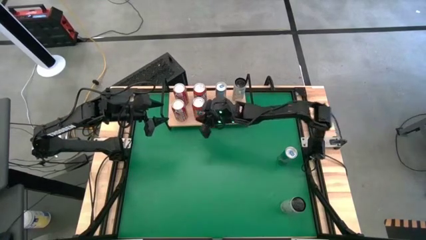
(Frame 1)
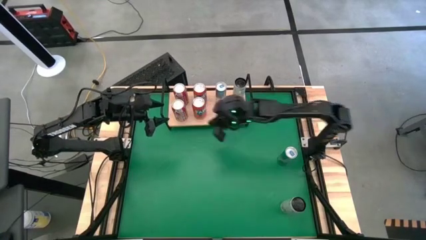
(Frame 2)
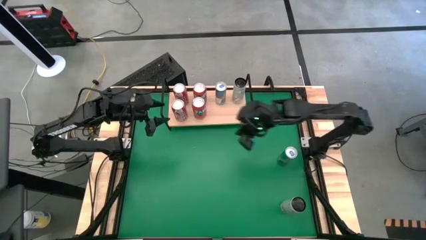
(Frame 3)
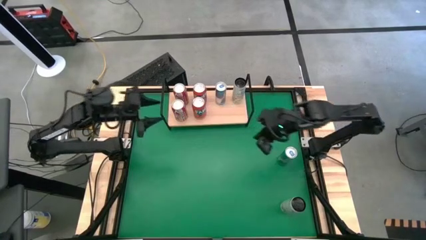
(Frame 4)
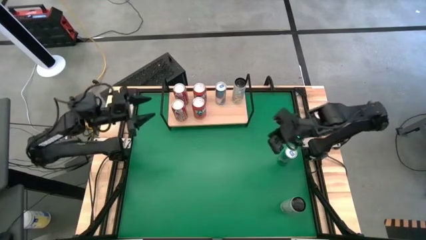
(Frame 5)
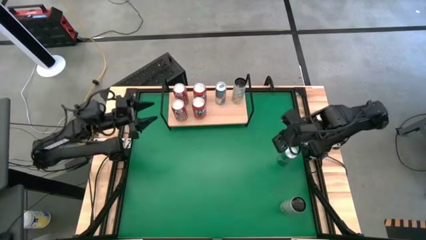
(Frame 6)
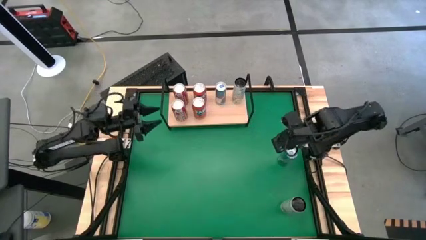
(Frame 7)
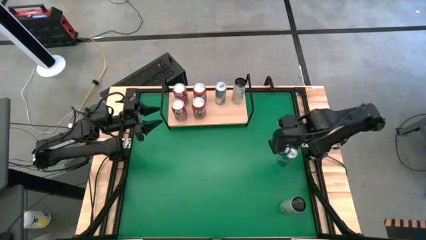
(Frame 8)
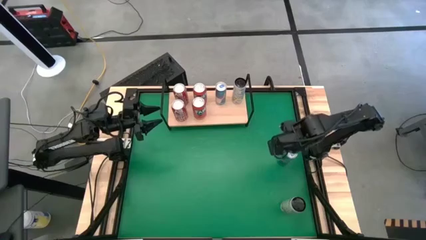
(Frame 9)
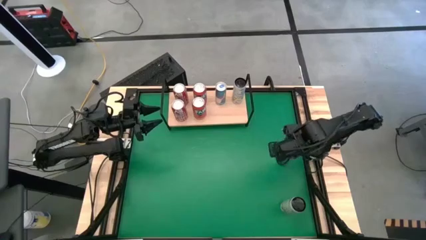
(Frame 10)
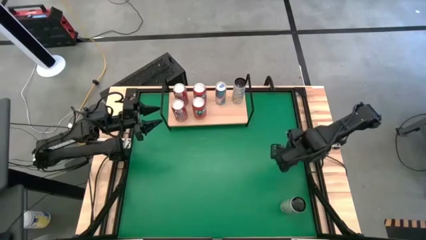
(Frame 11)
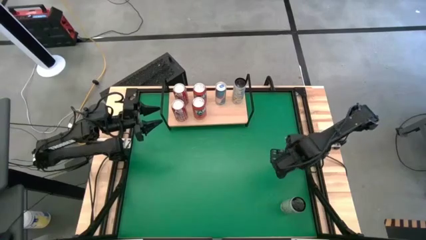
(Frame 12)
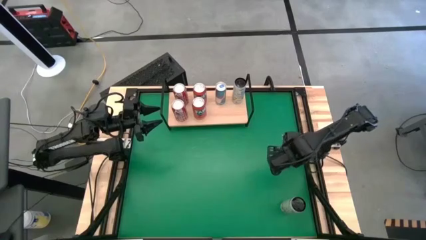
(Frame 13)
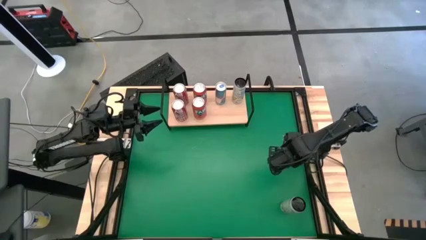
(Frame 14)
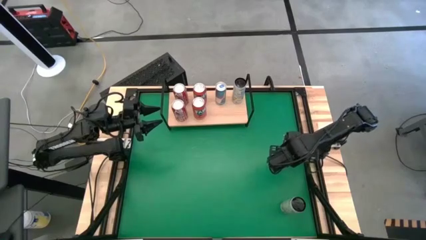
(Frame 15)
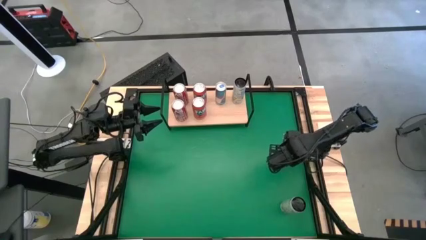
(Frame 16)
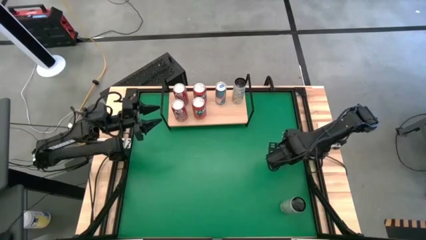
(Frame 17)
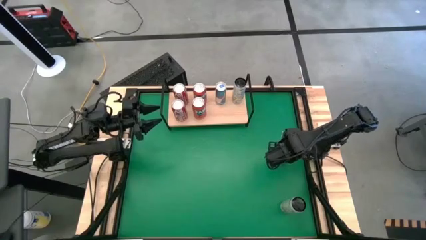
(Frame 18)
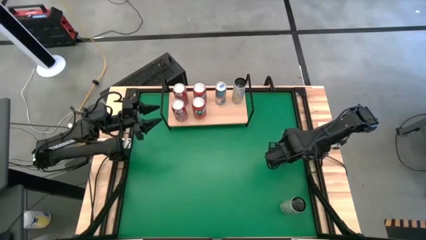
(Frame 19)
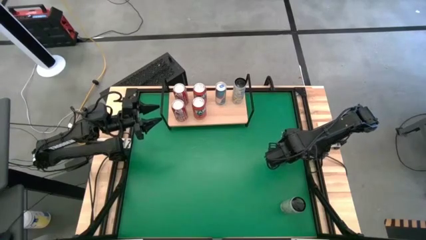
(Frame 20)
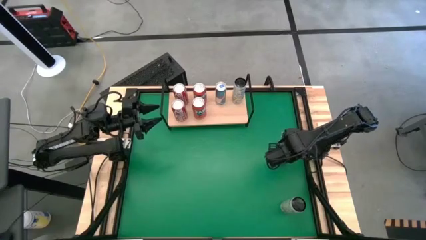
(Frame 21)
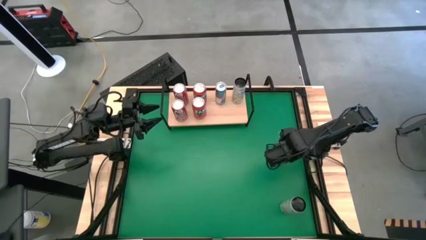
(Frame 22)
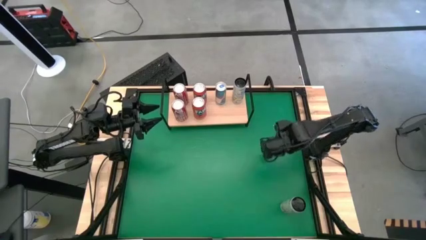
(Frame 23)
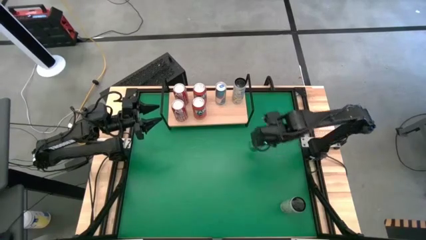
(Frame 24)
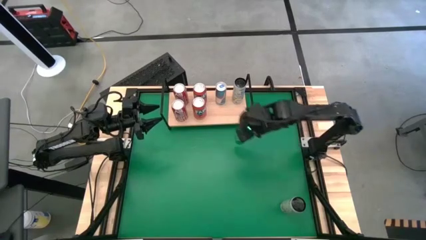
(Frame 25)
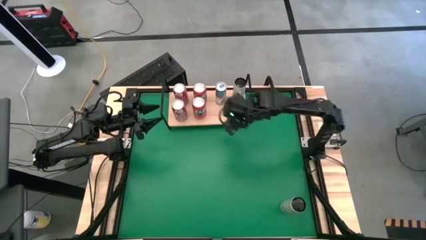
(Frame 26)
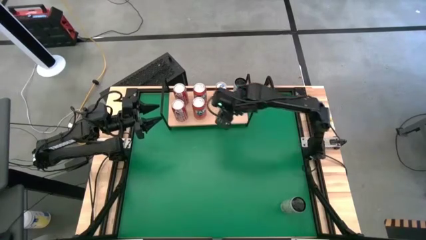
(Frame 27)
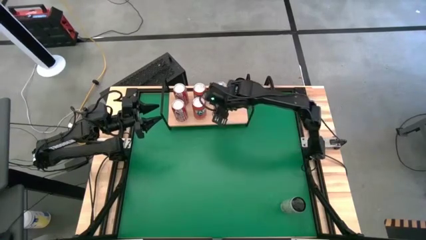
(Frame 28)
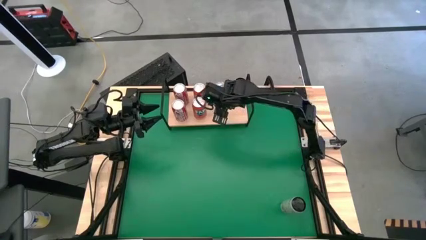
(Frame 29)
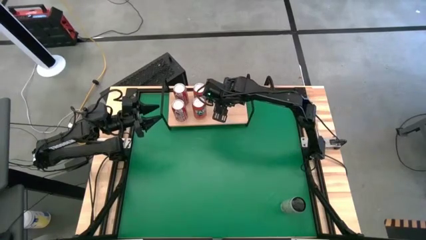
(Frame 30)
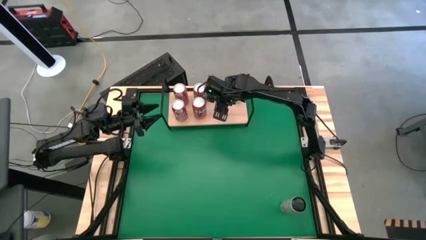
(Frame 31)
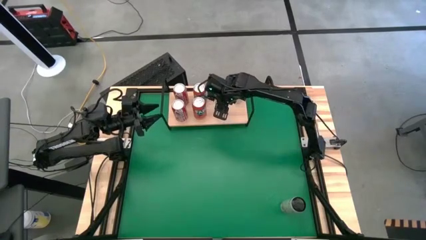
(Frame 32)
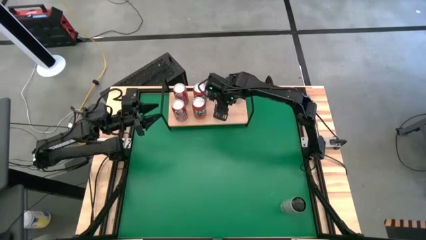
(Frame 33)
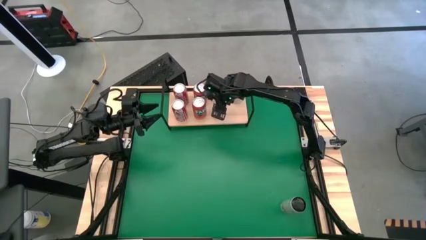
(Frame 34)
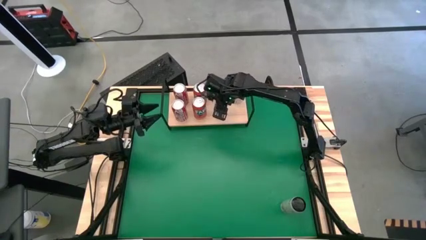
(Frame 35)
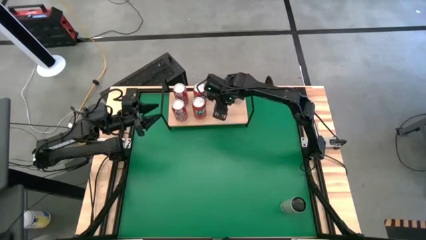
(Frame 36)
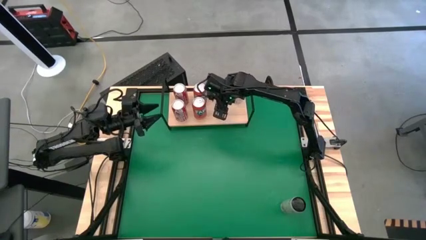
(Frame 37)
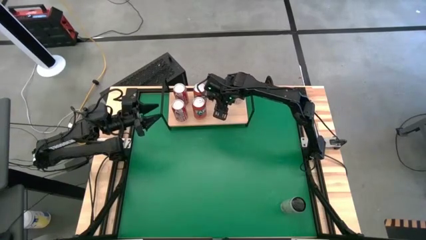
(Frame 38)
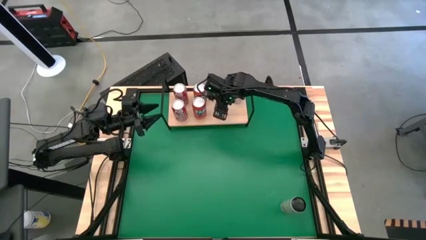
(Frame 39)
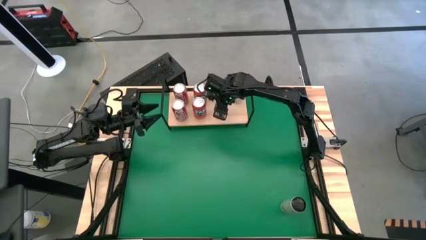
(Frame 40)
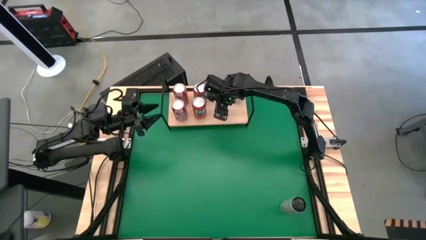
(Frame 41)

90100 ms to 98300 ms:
Task: Place canned beverage on shelf
Put the blue soda can on the shelf aligned with the other blue soda can

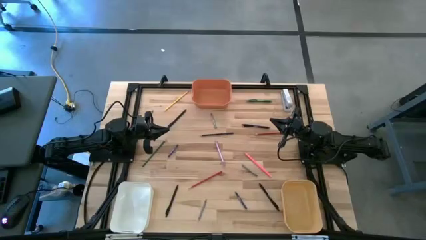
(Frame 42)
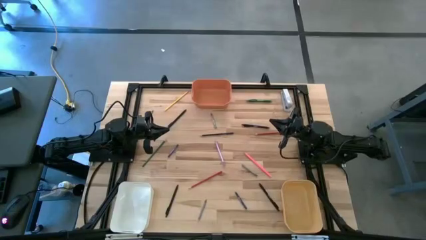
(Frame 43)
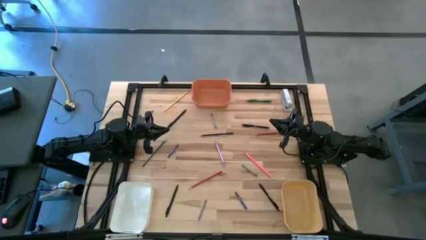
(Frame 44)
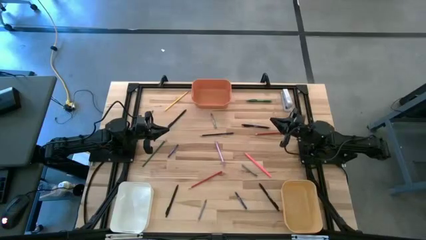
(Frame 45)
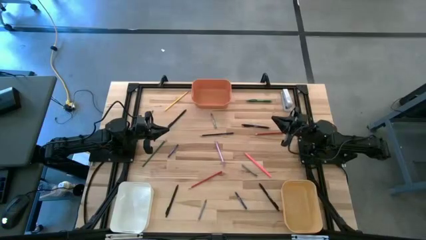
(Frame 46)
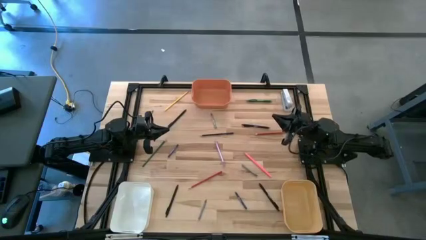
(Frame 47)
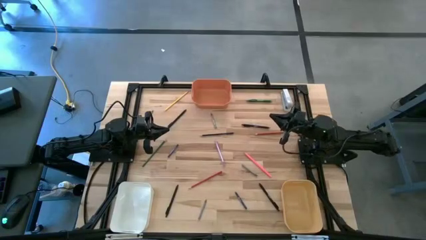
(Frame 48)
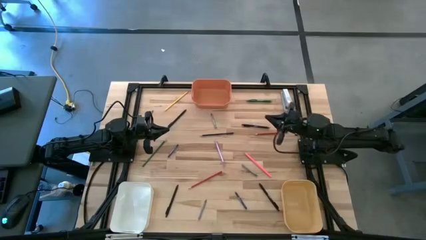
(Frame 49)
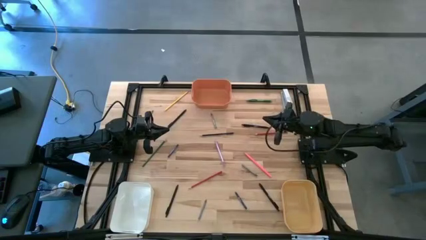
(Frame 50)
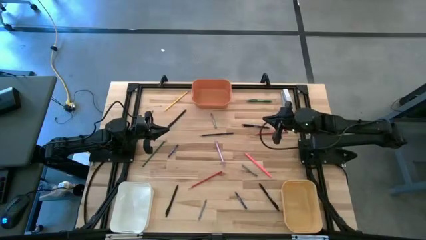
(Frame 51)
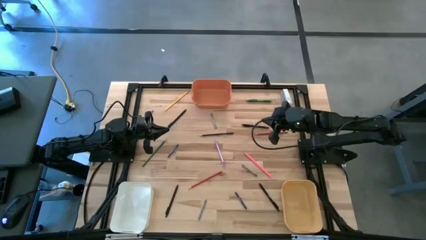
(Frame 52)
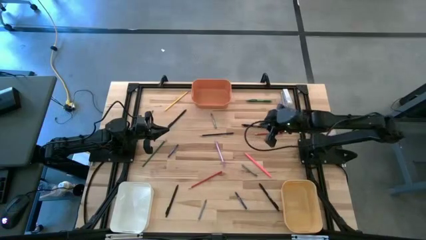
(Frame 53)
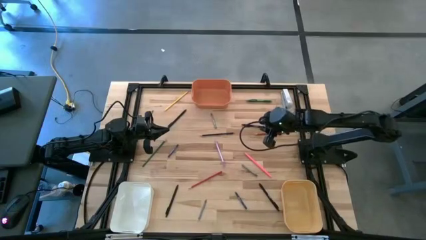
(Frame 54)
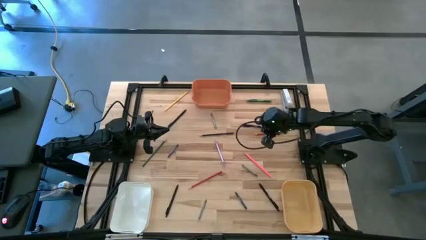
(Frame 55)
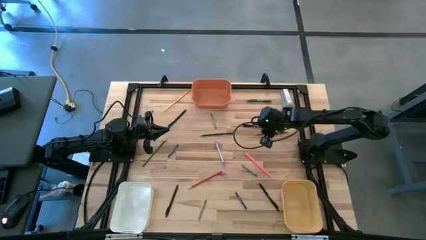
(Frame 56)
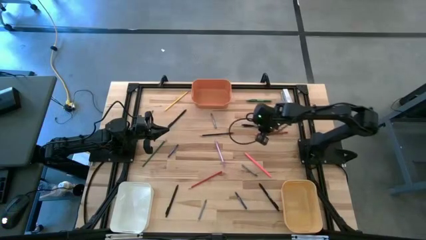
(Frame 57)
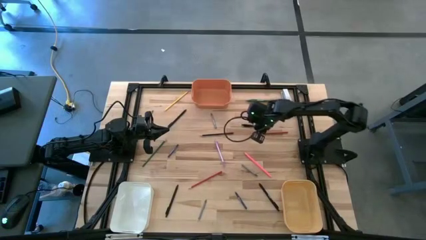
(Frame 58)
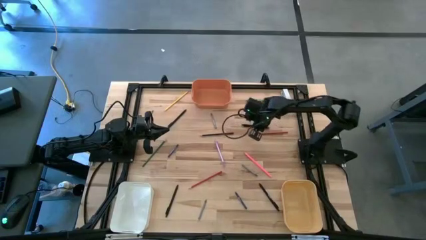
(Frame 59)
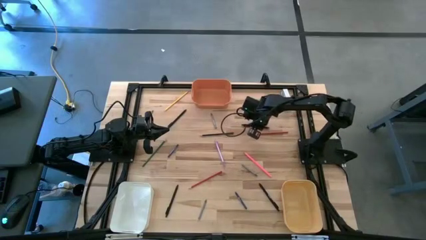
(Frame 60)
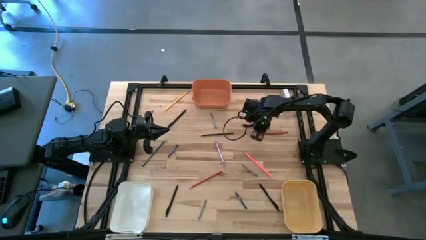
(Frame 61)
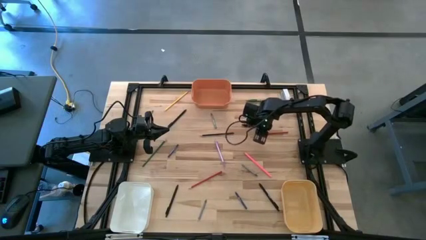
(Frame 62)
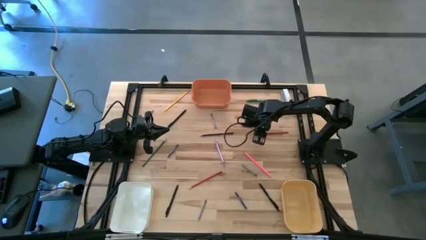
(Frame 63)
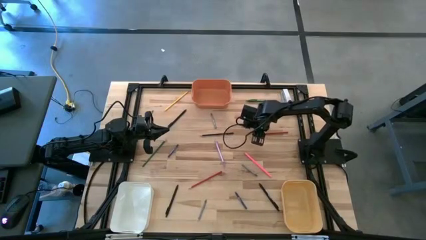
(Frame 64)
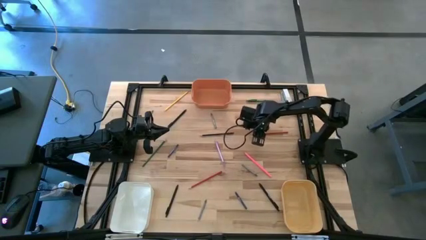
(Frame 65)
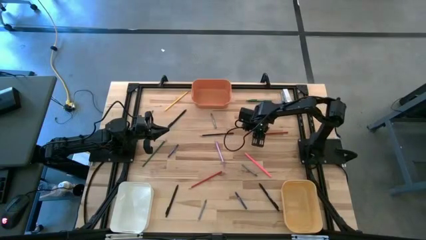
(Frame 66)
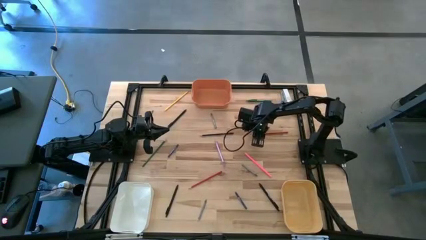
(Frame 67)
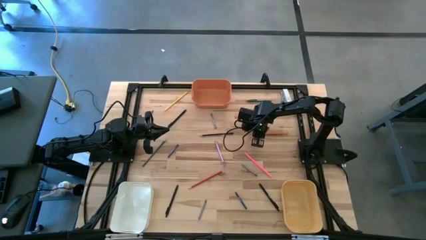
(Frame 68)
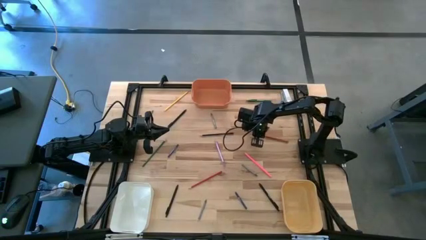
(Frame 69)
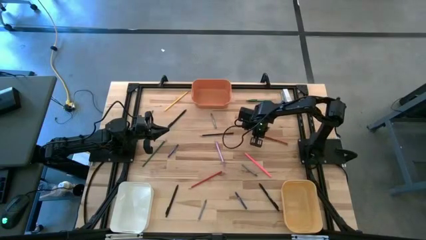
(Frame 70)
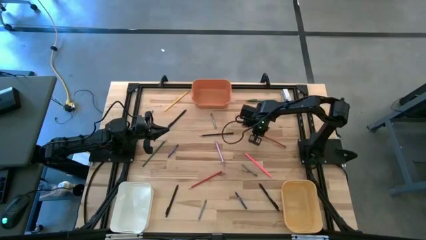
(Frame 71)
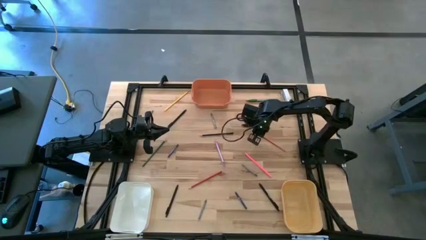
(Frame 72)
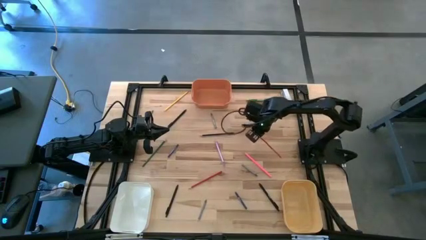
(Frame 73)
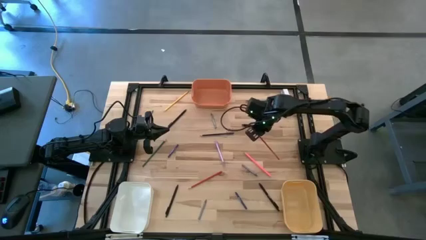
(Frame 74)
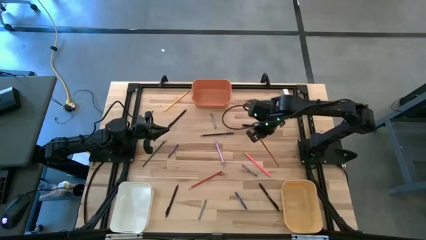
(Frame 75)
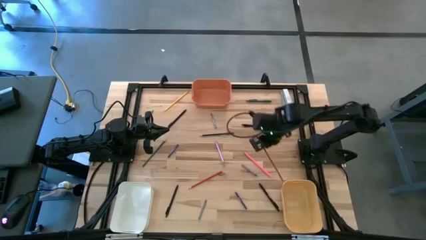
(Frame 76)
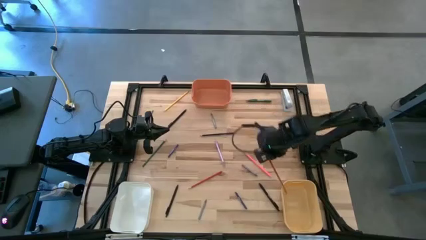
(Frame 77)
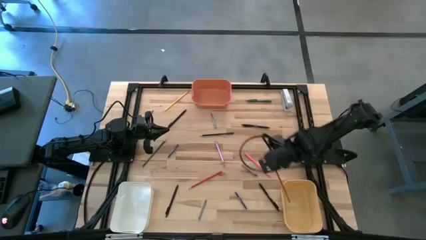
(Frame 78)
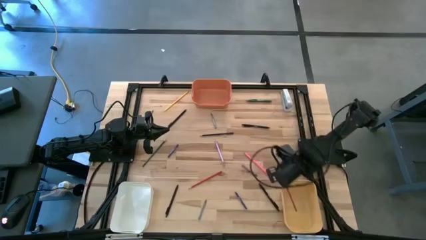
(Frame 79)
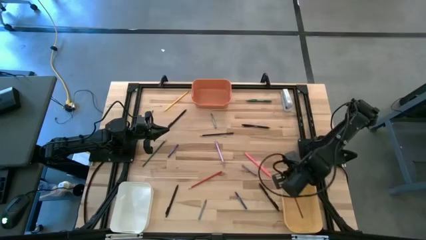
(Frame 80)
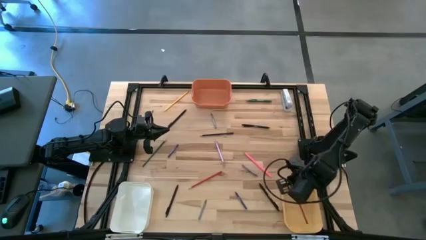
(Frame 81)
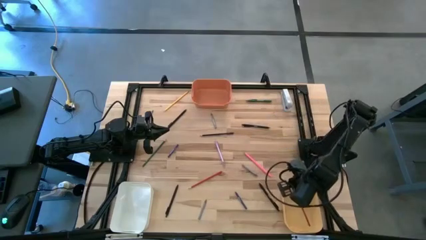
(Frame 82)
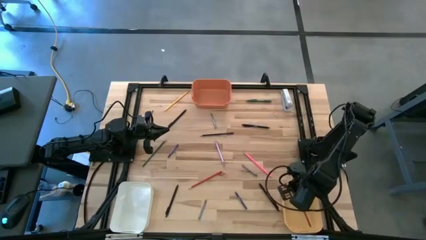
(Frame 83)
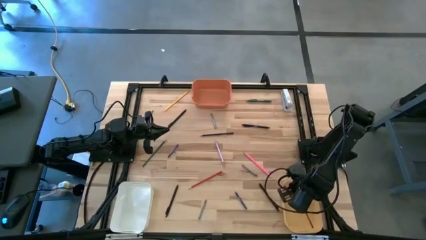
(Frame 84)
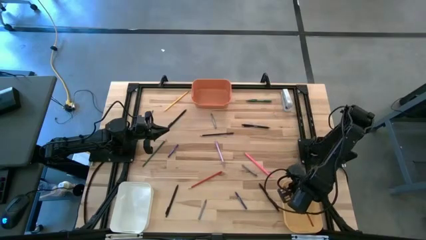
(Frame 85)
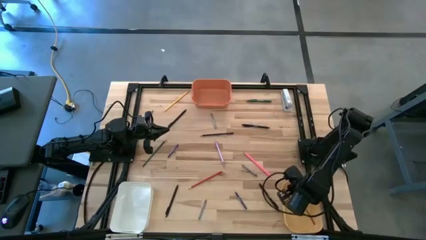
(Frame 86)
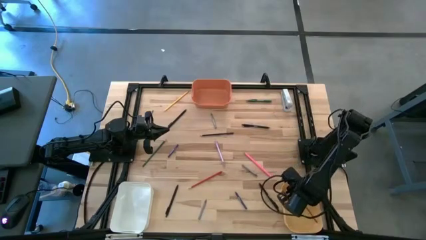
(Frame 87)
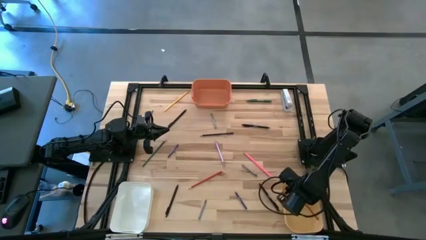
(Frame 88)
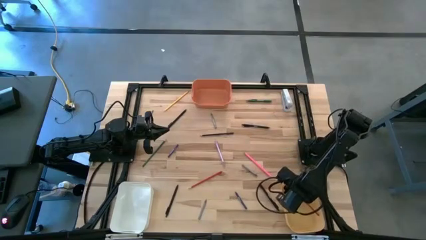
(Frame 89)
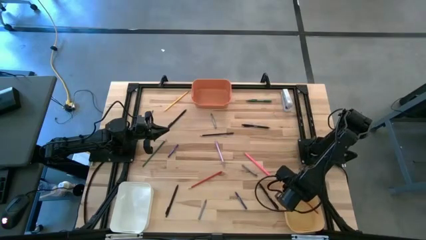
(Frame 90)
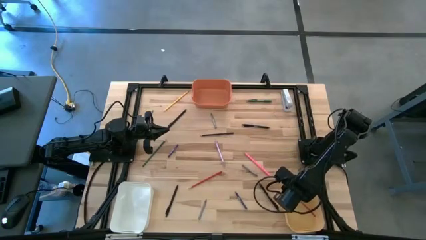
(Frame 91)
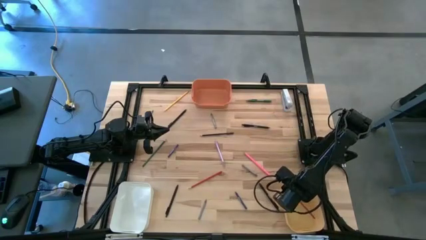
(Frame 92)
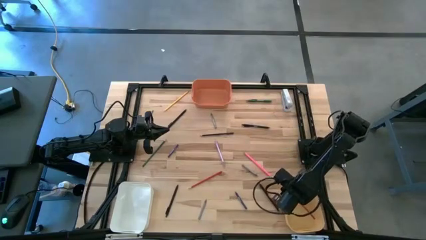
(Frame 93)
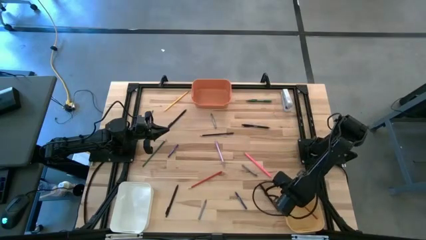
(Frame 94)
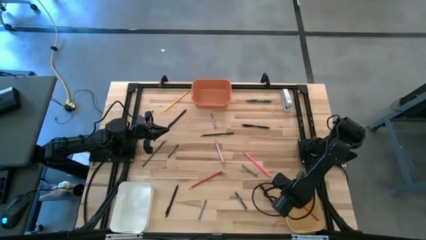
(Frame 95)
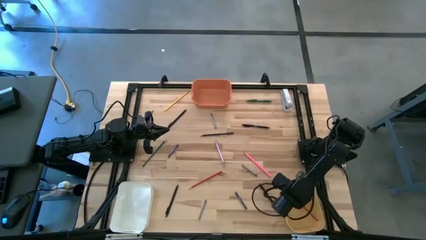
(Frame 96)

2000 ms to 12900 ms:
Task: Sort crayons/erasers/pens/pencils in bins
Put the red pencil into the yellow bin
